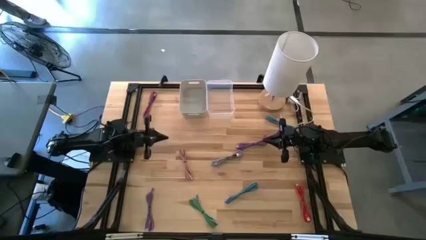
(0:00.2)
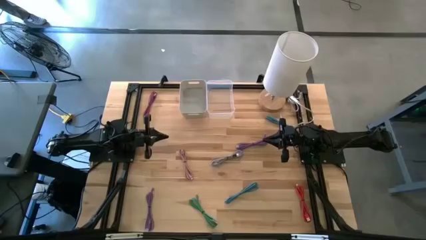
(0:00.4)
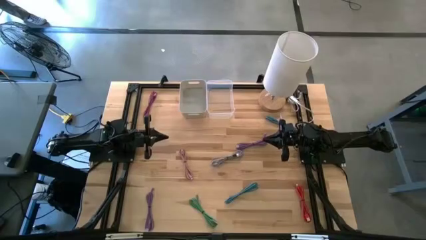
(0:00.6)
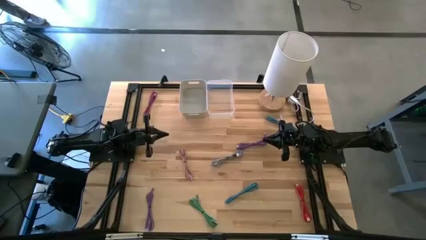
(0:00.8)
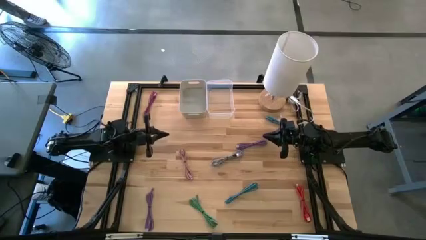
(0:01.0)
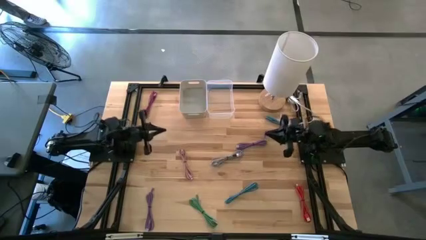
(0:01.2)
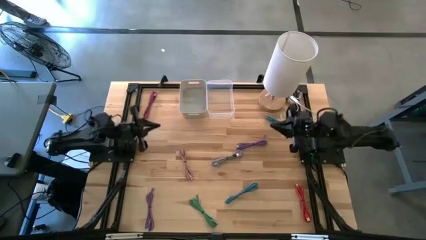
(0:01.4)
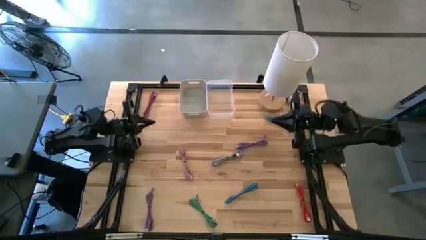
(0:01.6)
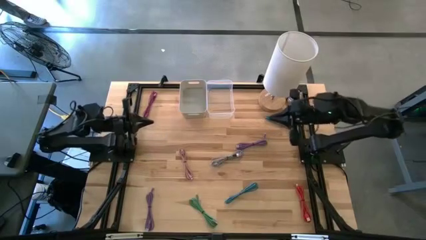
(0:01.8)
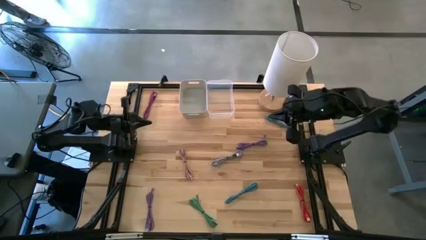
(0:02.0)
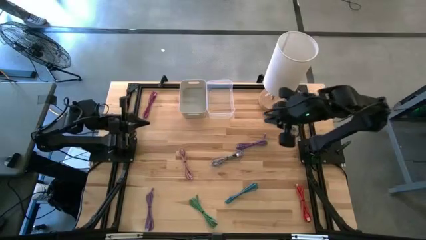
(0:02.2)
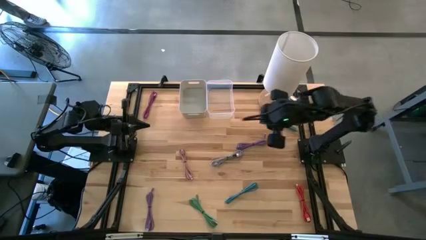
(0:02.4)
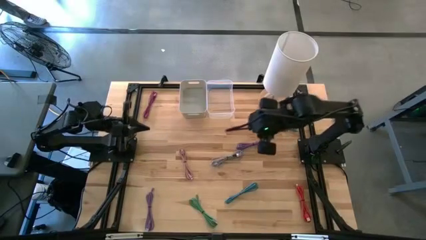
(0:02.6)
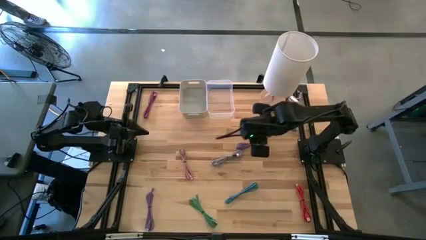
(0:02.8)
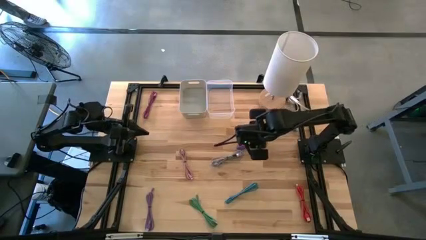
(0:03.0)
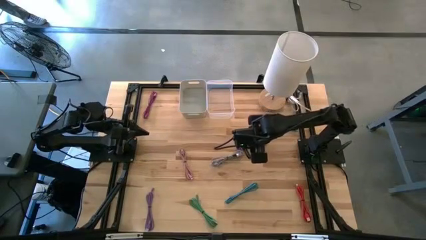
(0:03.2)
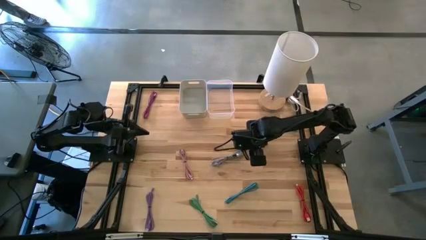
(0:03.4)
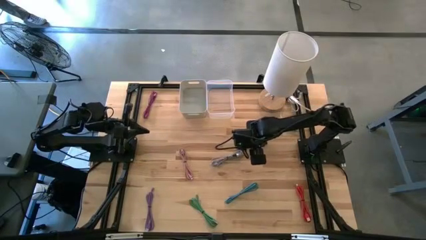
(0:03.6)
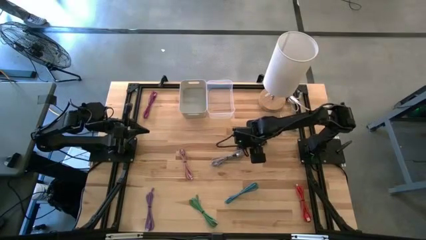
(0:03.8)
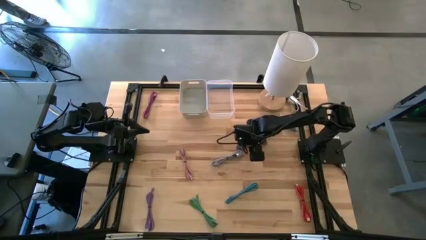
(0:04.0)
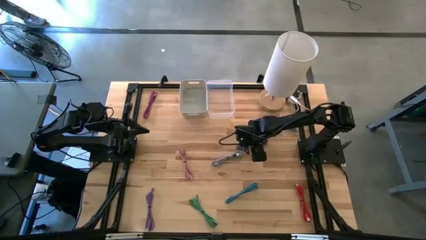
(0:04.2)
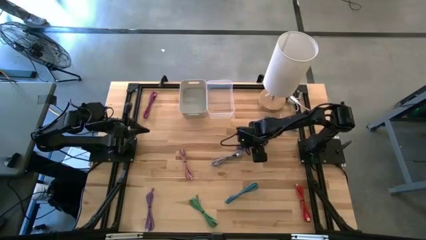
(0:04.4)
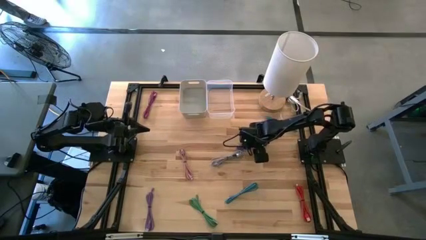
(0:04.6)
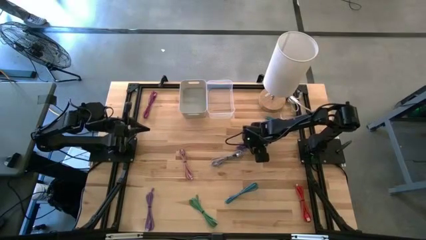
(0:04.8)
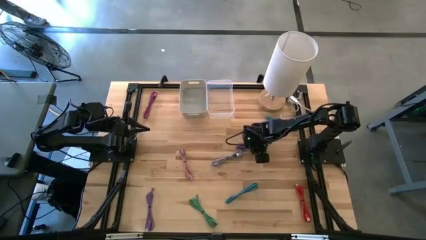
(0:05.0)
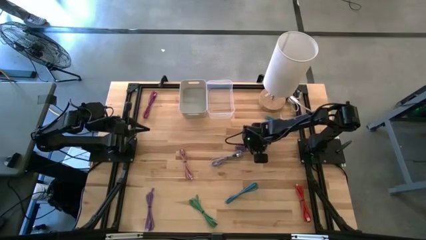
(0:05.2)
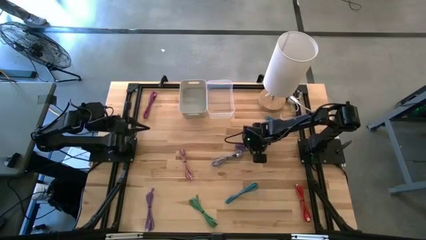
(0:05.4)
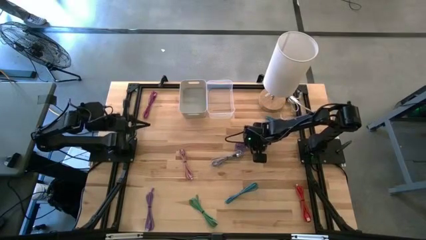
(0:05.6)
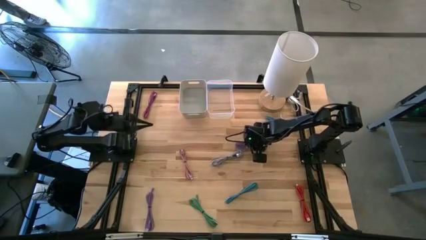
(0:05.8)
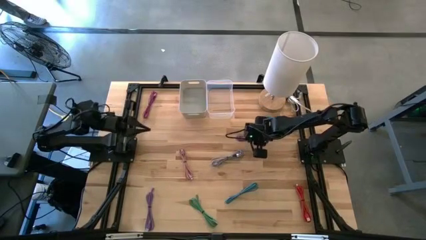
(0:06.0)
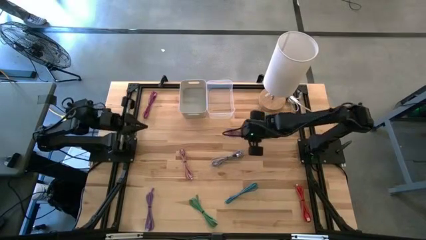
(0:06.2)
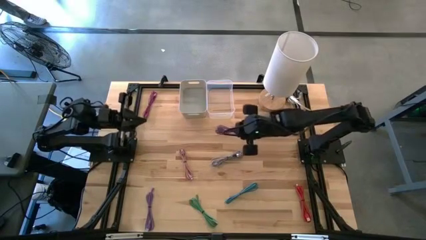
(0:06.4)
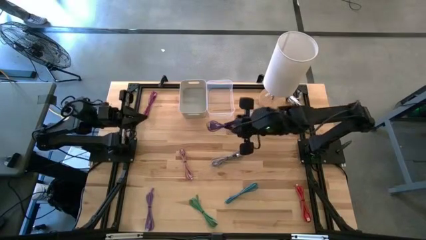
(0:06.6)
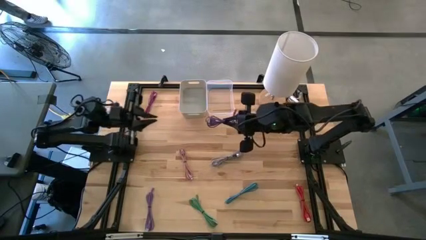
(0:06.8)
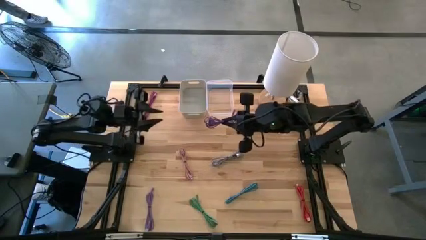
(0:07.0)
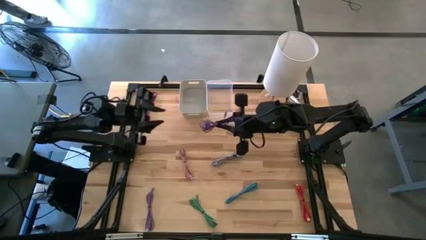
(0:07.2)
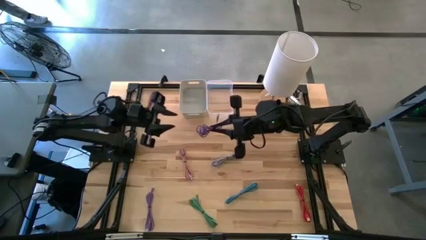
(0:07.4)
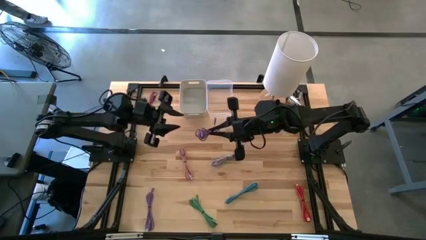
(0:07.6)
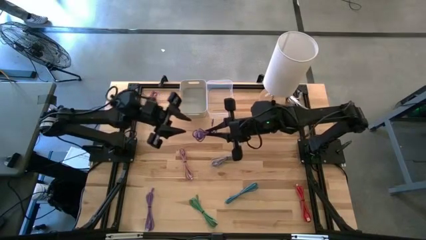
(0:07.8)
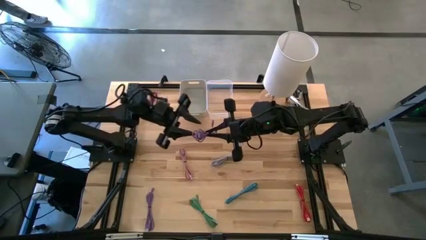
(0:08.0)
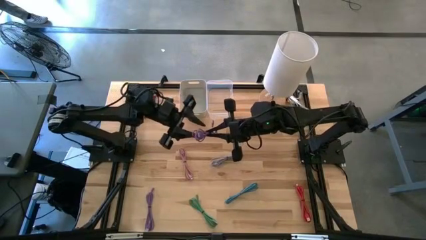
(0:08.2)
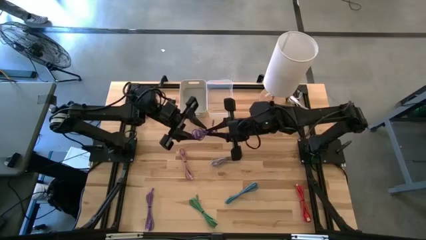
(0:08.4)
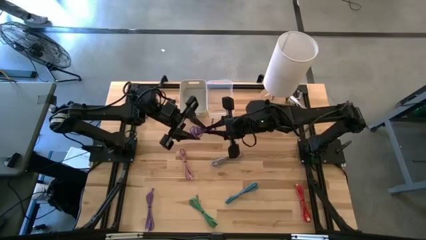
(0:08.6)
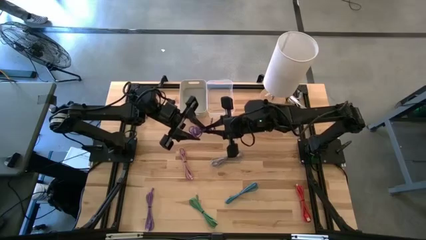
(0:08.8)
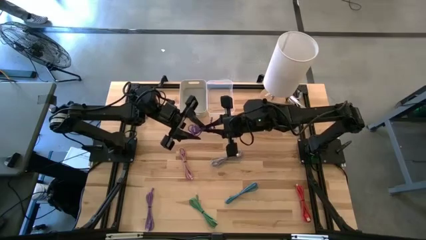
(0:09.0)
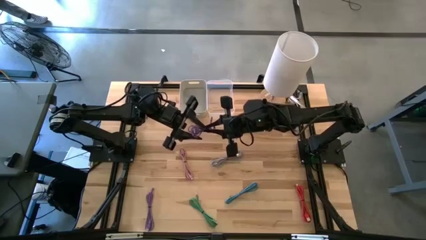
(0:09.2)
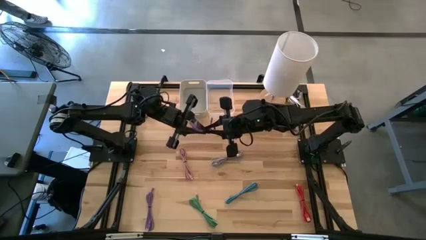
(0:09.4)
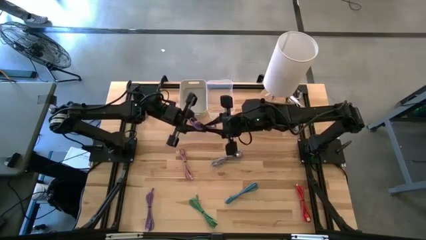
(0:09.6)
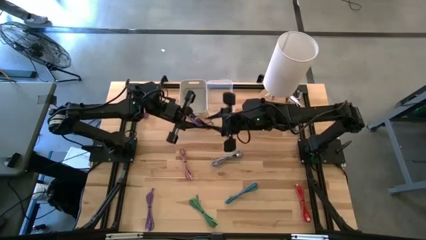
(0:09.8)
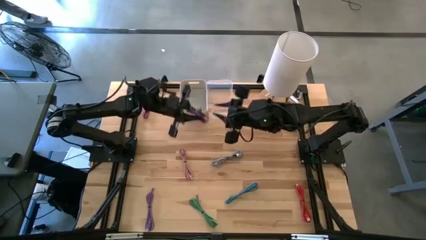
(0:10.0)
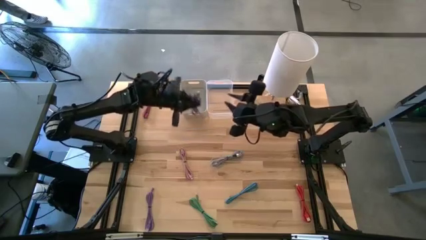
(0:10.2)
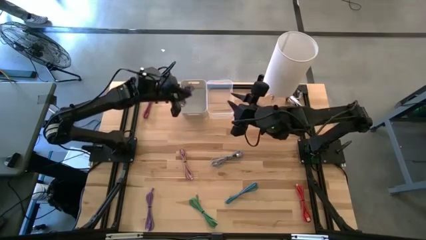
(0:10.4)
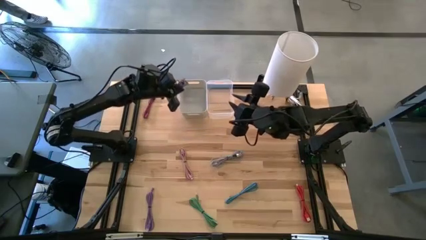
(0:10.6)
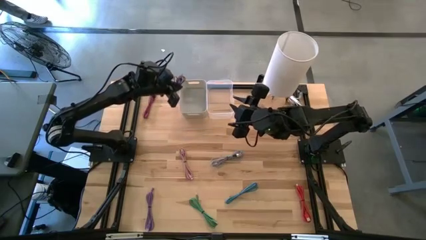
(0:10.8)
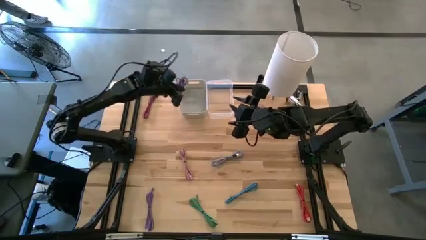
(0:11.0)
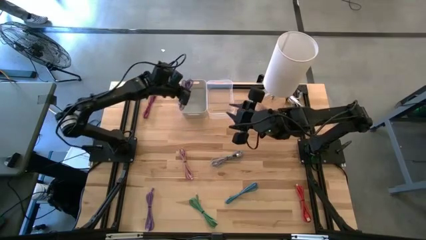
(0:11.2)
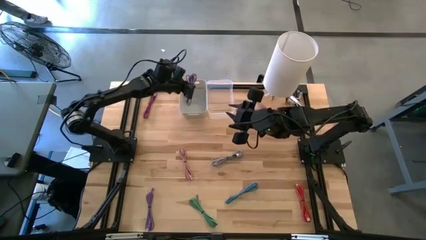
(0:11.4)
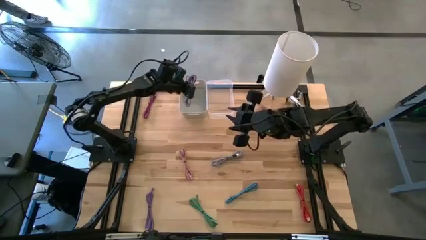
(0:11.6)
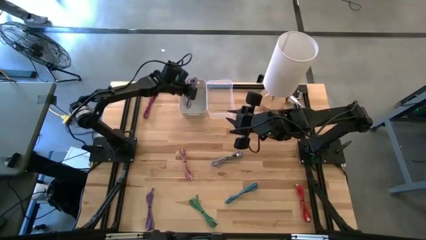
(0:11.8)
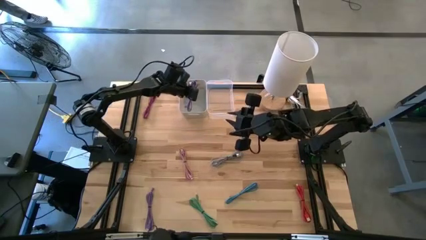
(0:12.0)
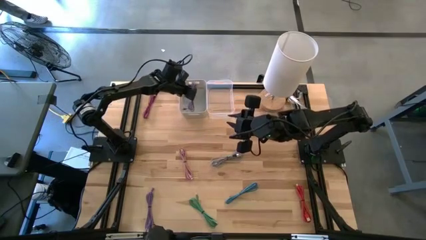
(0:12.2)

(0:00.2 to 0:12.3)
Task: Pick & Place USB Port
Put the top right violet USB cable into the gray bin
